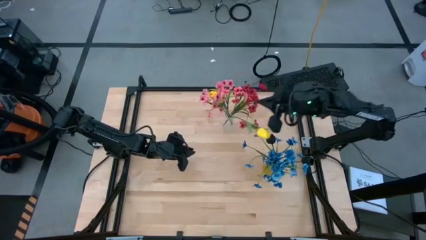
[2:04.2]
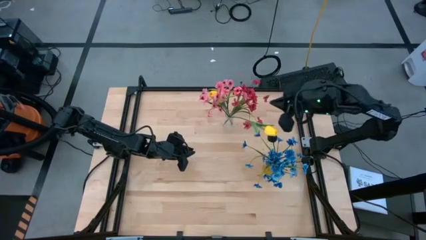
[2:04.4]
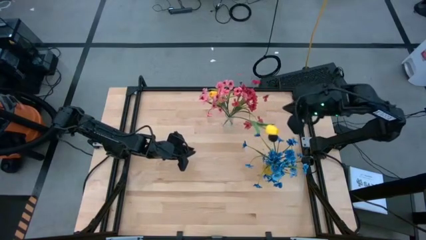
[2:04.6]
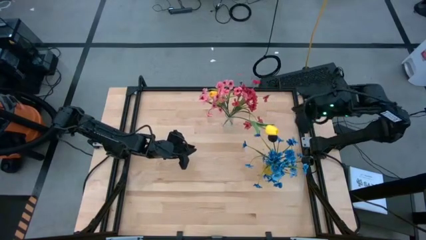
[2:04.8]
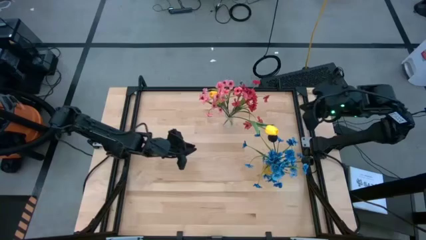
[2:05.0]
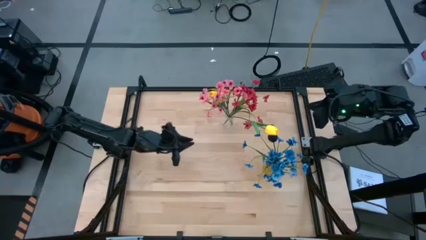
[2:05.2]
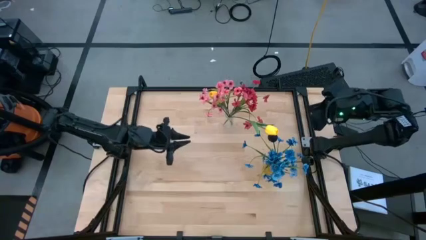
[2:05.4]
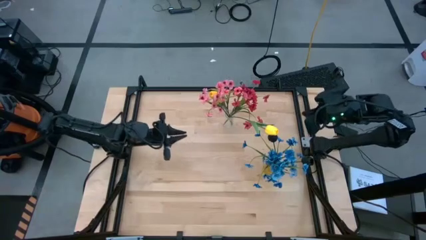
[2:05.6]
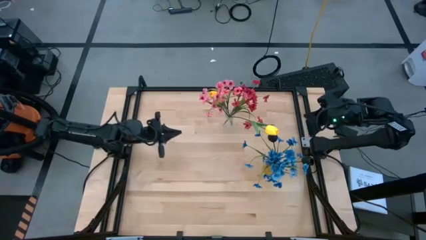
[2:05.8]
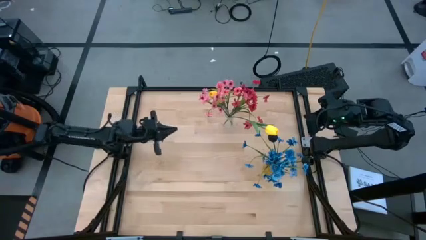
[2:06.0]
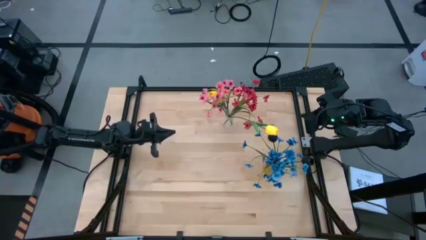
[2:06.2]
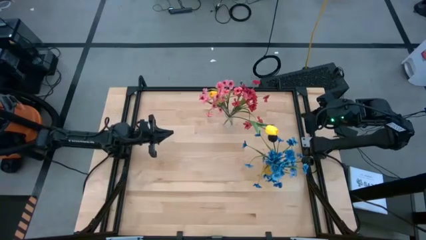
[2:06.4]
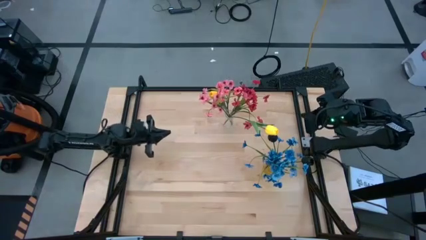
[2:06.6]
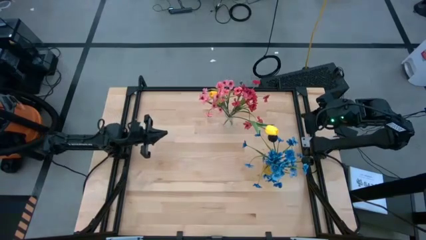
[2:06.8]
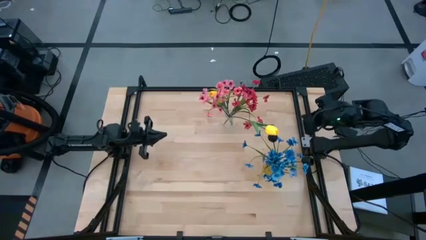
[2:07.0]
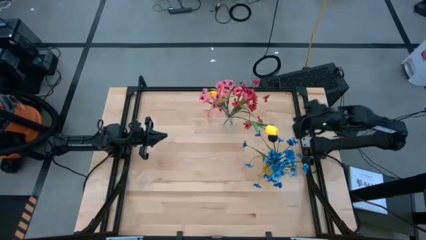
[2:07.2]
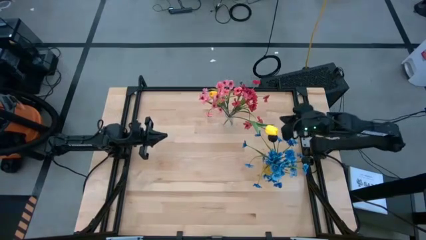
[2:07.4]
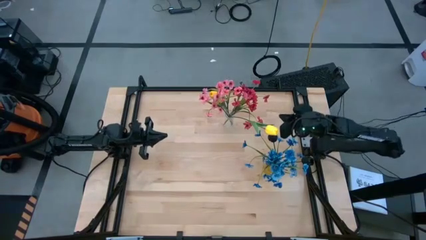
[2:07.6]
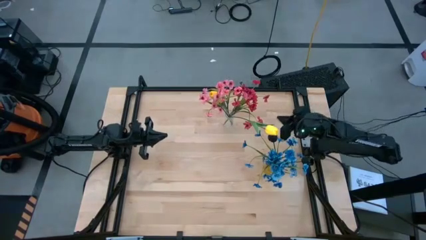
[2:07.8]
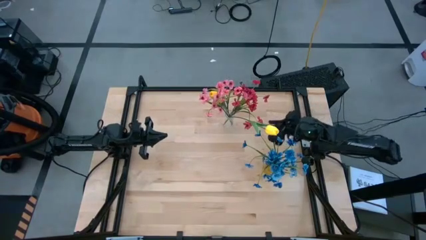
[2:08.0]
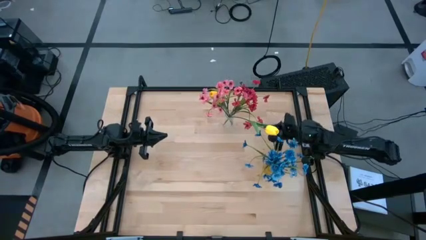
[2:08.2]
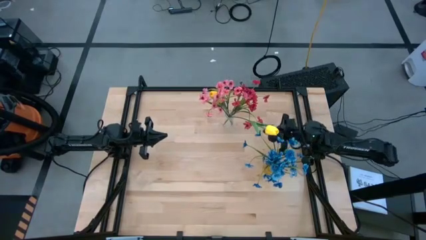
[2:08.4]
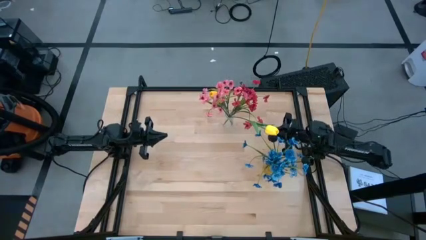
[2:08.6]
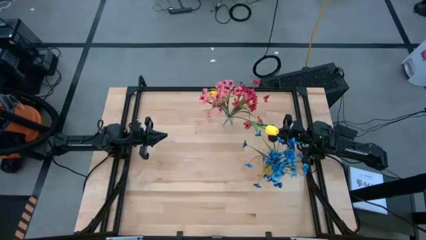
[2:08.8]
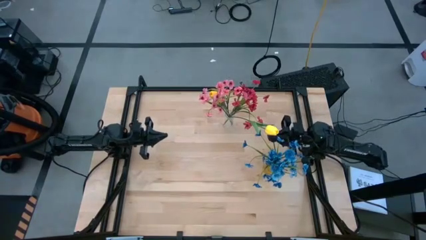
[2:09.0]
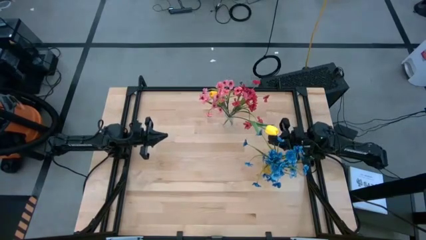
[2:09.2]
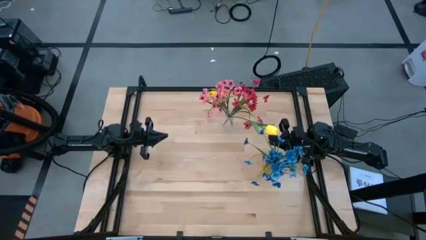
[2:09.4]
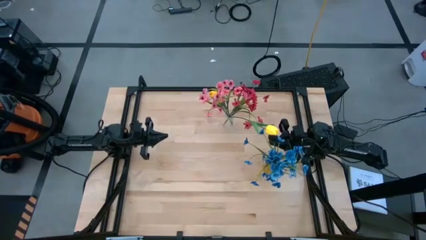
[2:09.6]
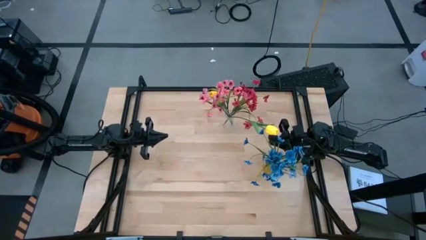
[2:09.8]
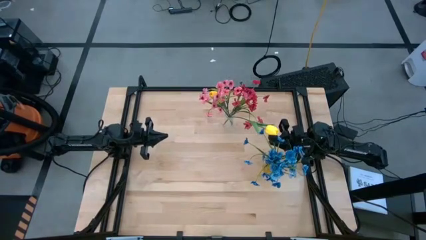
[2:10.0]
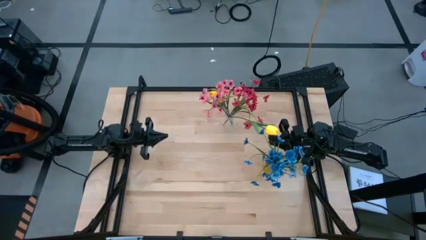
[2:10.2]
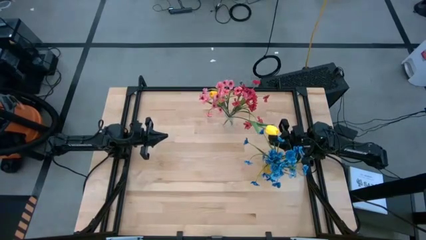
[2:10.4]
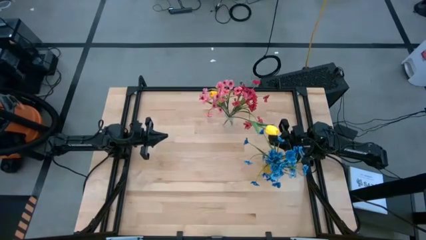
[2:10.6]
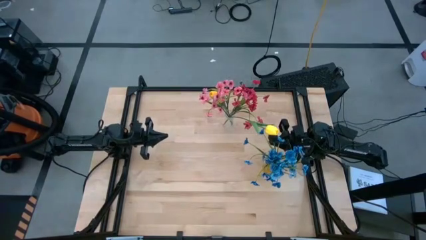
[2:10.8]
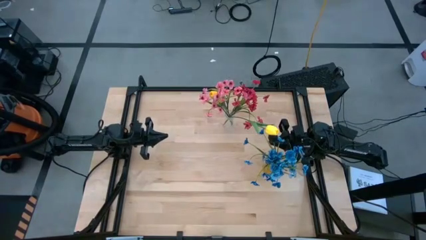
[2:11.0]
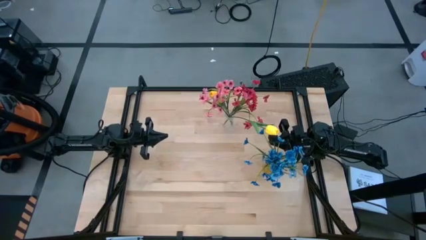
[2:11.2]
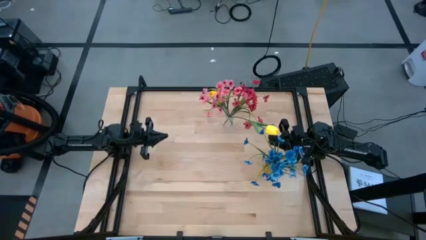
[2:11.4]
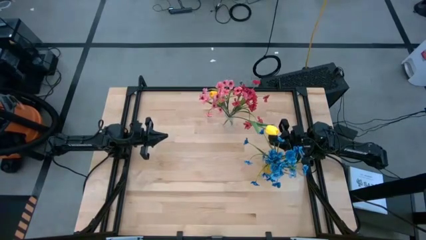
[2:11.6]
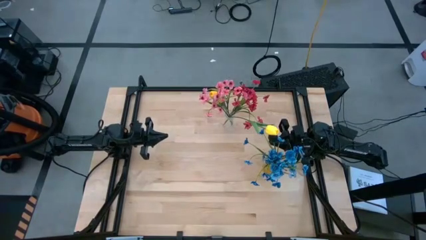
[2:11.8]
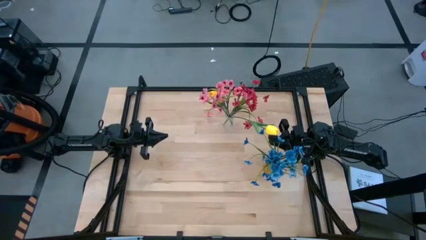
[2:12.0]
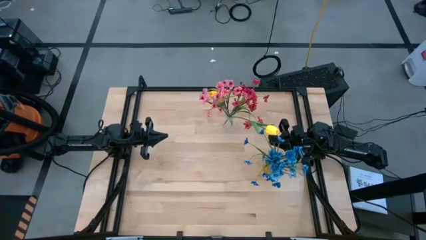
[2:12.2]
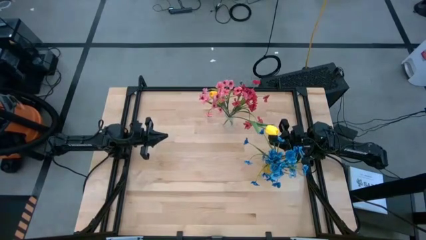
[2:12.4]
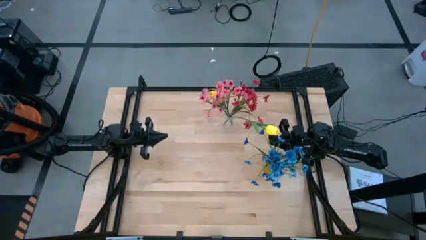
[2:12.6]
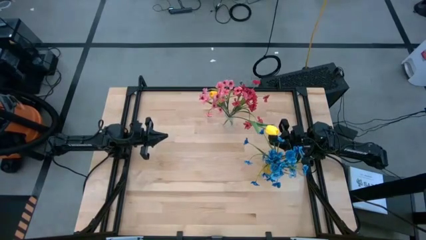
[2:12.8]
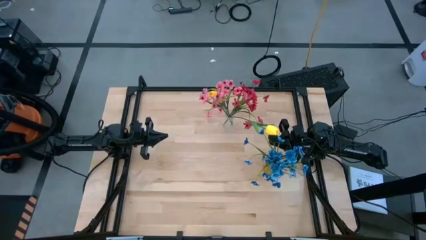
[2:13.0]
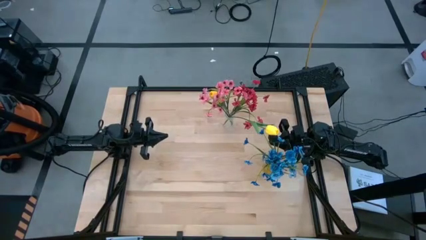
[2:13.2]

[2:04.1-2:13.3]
Task: Sort flowers into vase by color
Return to Home Position

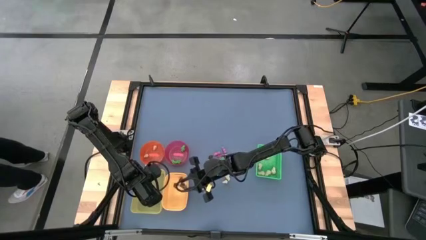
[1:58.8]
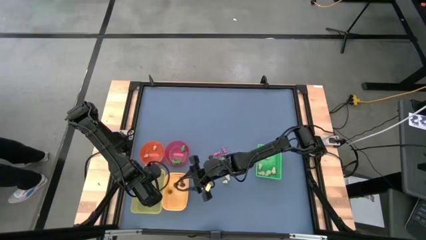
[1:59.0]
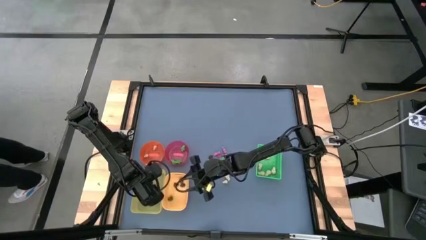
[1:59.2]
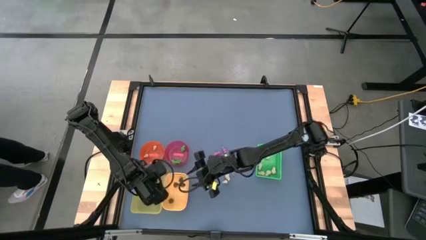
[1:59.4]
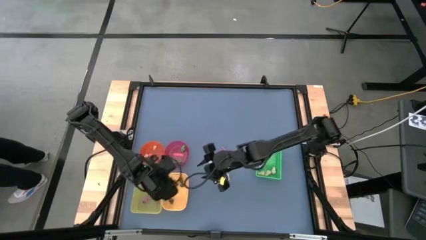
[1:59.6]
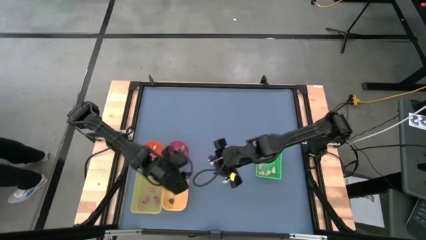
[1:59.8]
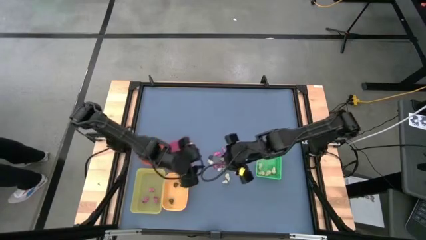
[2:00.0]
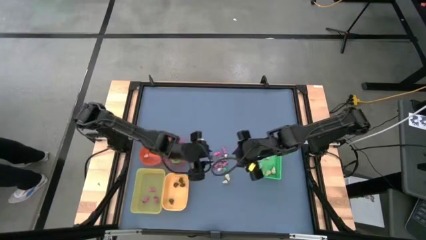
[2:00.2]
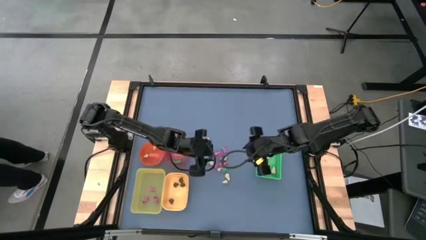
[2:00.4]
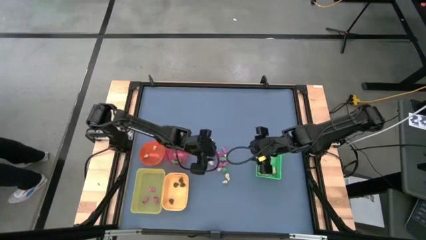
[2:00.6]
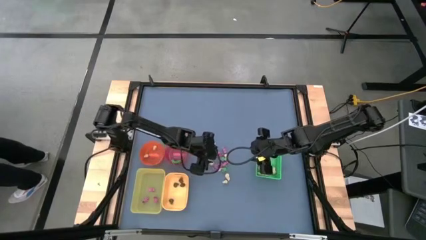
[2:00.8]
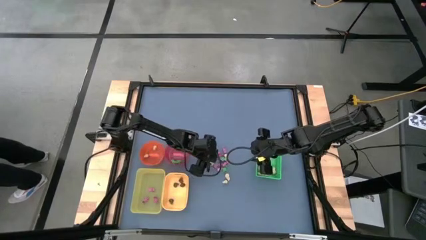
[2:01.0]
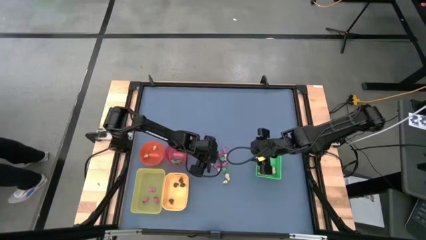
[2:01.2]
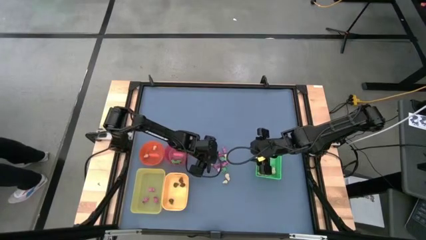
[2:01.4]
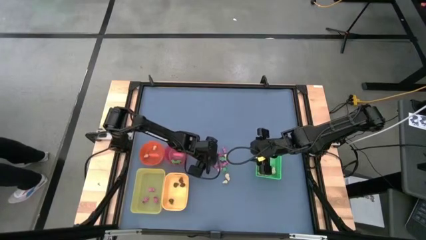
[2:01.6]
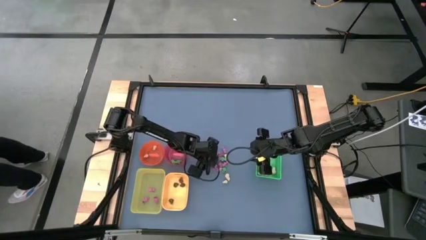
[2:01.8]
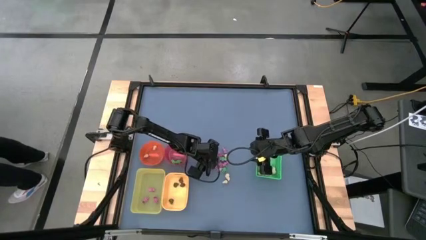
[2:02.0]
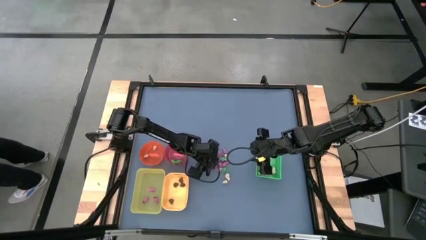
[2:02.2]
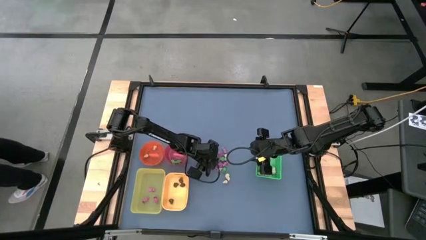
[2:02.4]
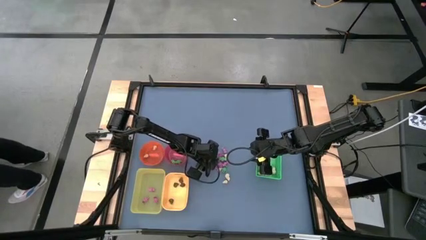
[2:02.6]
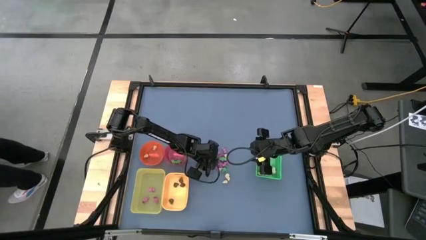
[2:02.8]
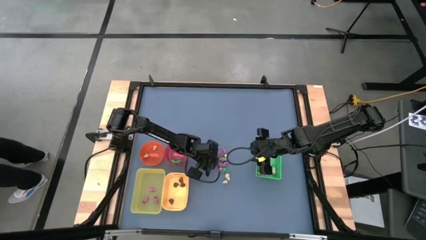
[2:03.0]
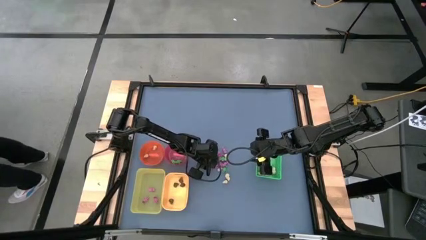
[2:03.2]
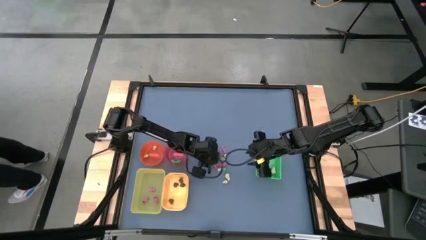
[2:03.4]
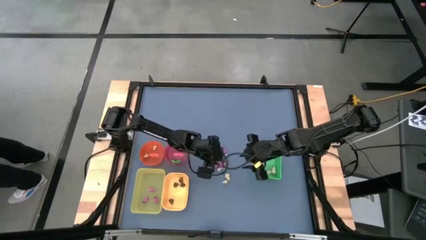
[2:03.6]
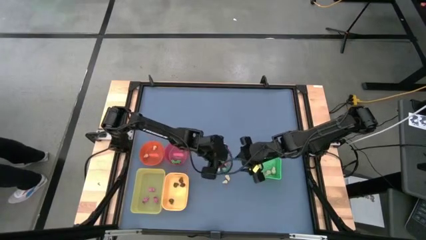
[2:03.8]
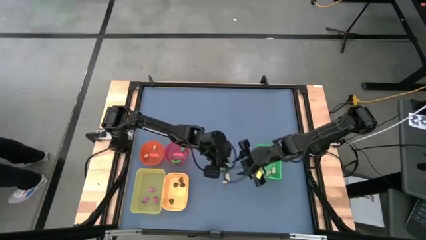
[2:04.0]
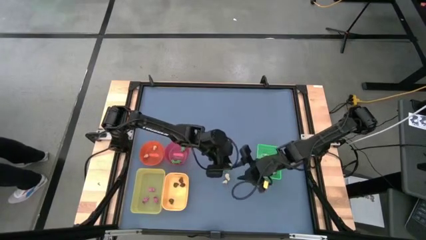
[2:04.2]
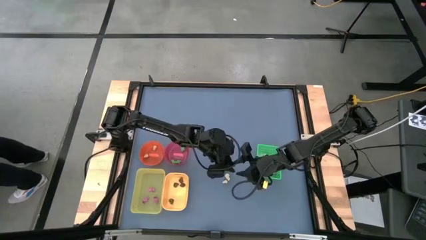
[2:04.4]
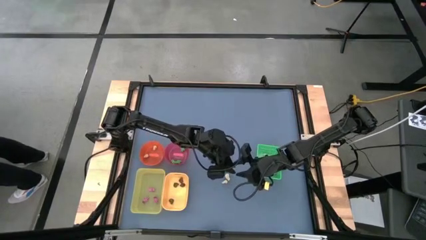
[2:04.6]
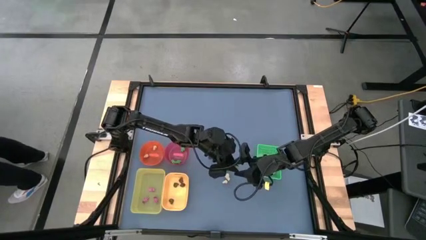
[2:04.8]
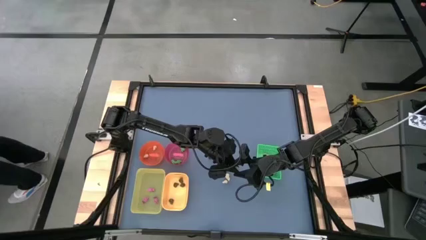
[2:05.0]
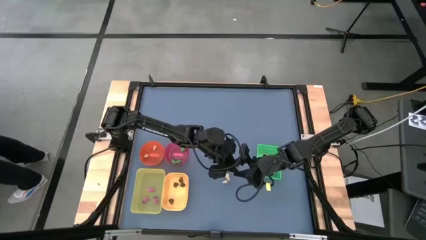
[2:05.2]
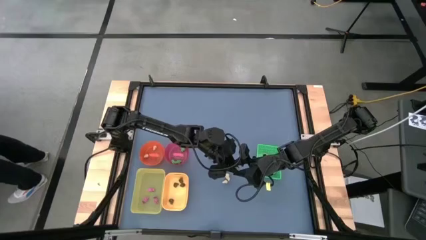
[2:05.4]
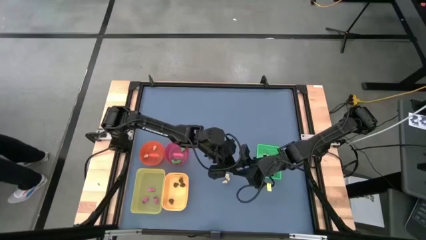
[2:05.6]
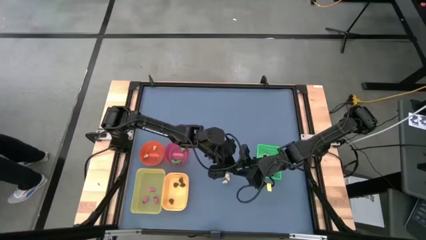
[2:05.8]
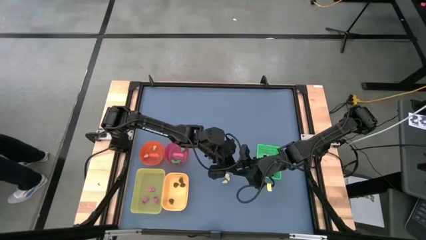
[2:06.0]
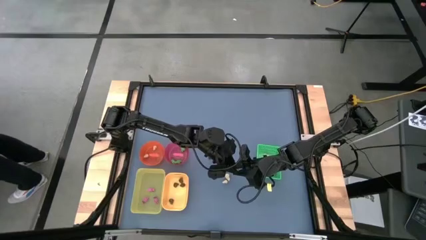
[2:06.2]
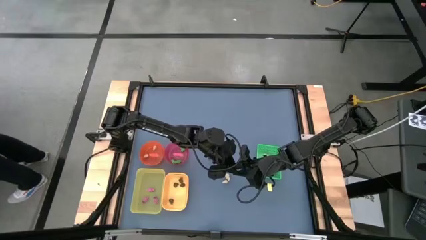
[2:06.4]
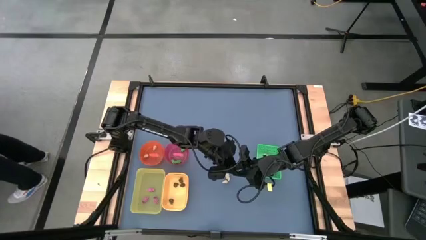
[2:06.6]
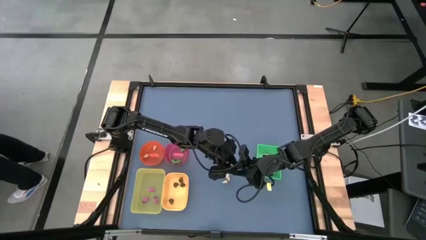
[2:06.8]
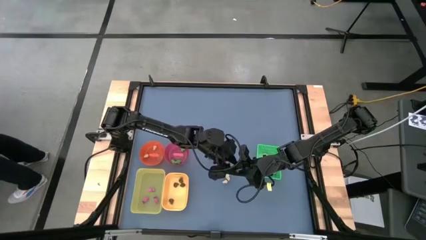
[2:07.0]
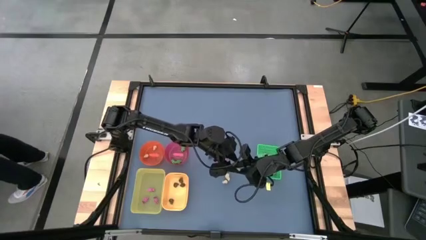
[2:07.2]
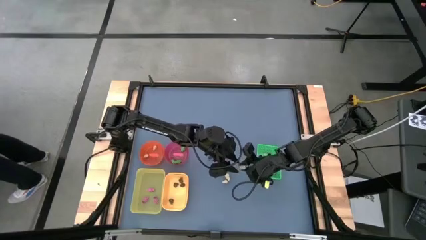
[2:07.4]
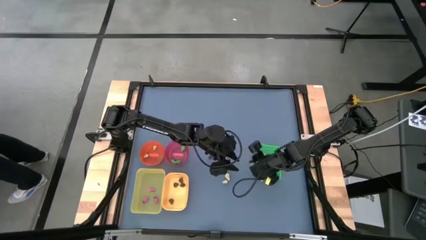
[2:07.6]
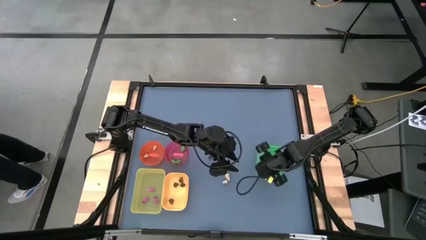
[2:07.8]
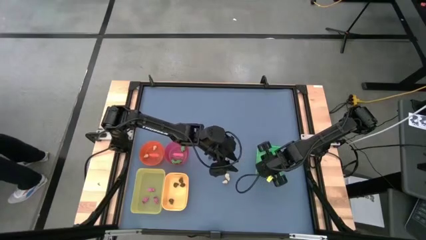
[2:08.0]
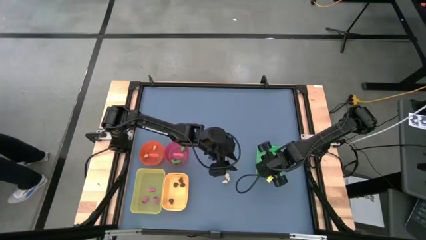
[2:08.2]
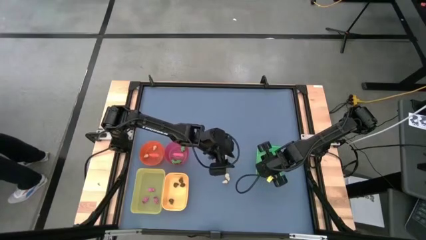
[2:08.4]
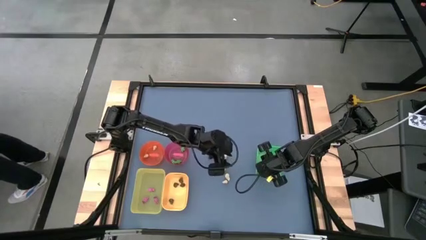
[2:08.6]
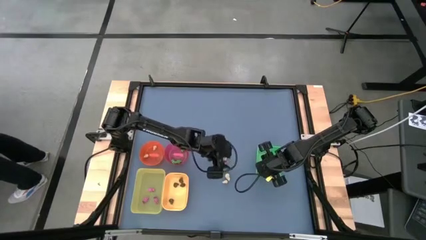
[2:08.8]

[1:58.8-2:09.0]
Task: Sort Halloween decoration
Put the white skull toy into the green bin
